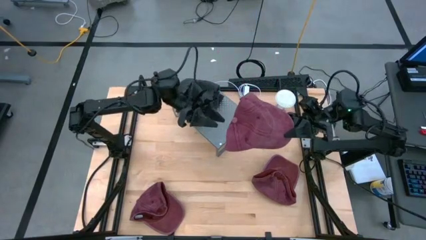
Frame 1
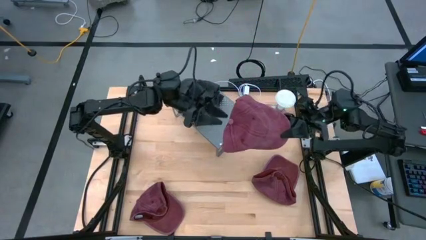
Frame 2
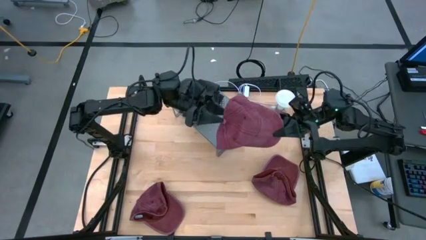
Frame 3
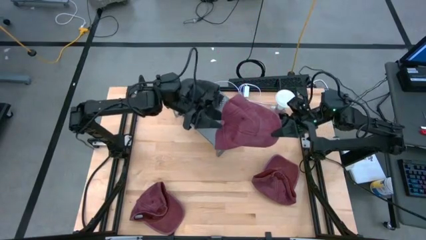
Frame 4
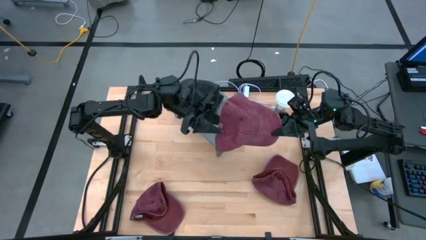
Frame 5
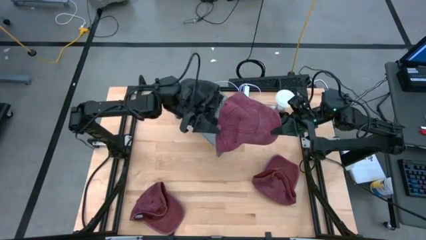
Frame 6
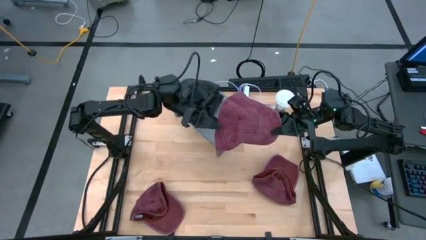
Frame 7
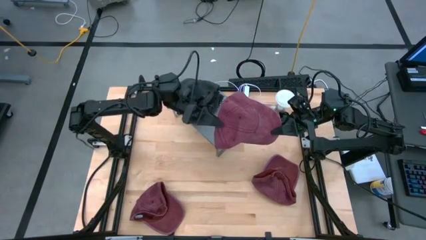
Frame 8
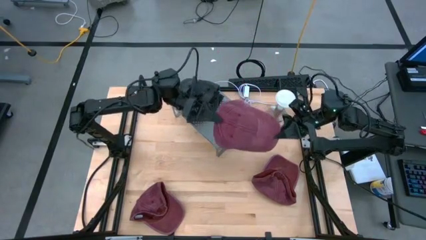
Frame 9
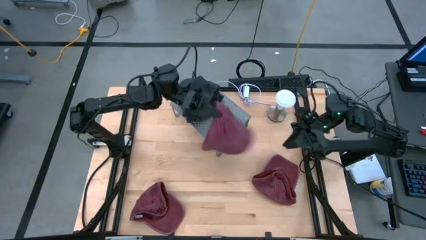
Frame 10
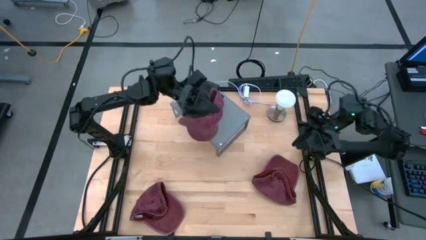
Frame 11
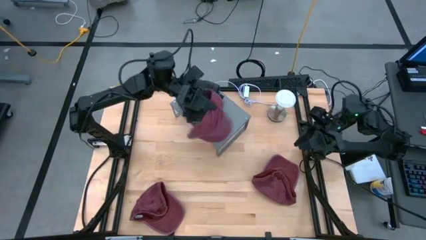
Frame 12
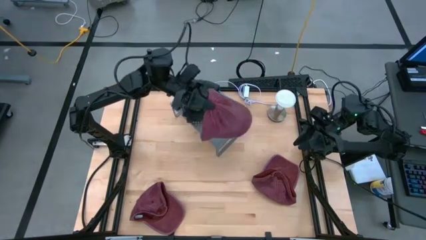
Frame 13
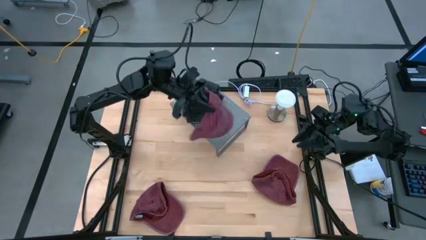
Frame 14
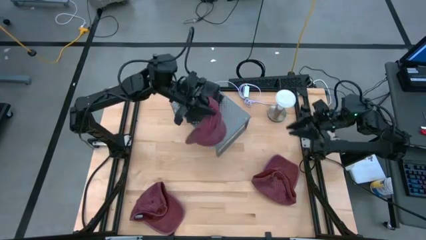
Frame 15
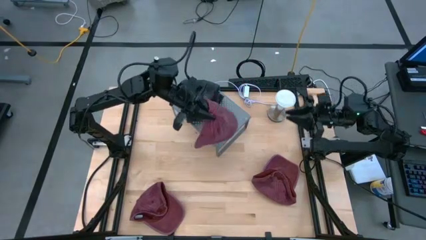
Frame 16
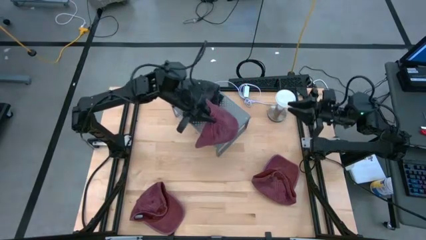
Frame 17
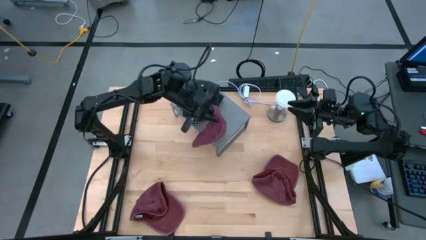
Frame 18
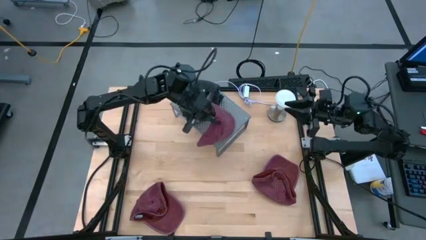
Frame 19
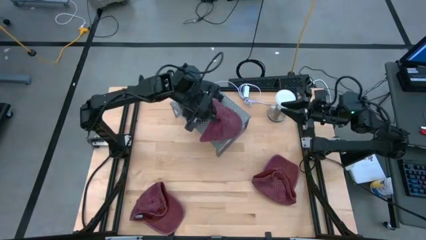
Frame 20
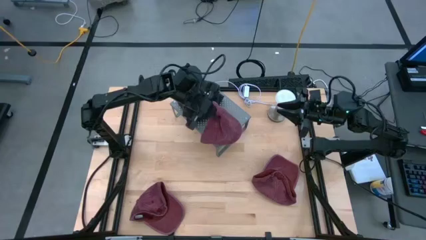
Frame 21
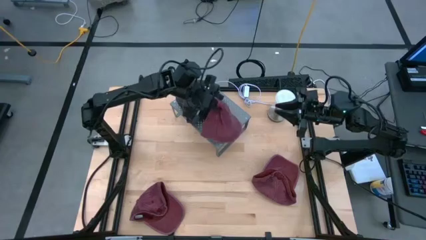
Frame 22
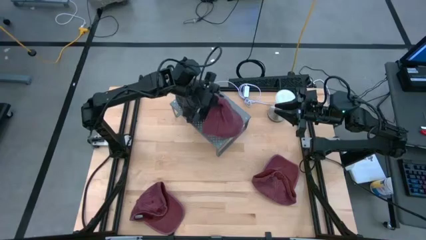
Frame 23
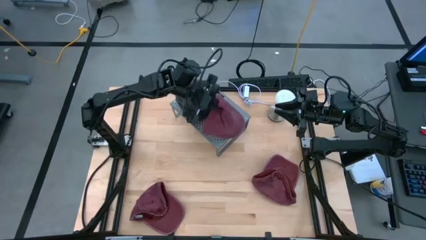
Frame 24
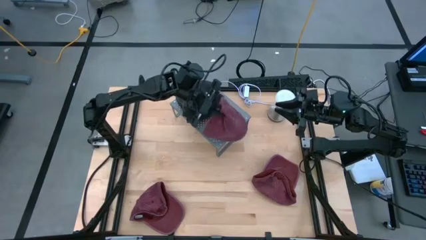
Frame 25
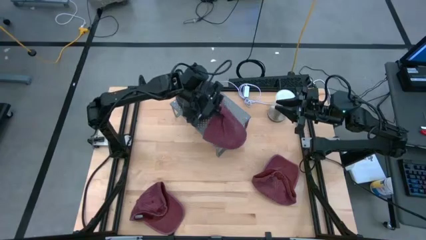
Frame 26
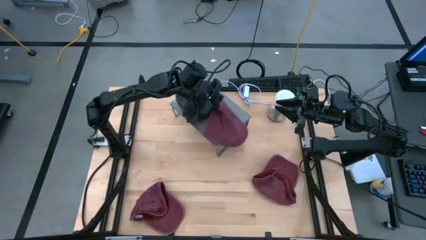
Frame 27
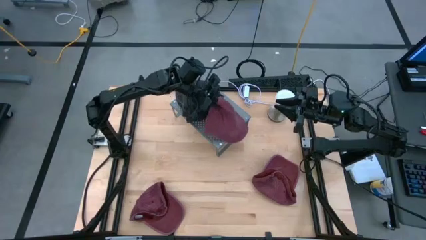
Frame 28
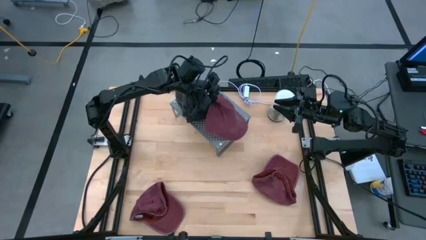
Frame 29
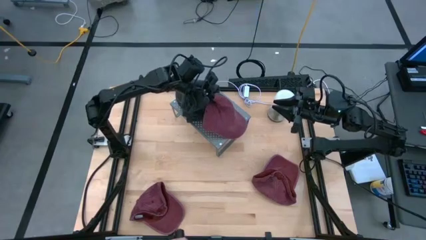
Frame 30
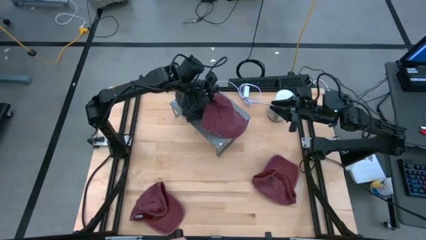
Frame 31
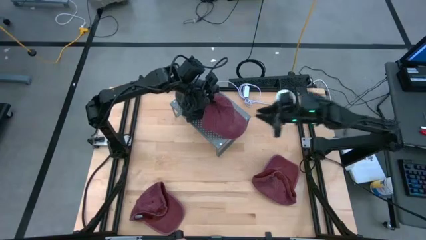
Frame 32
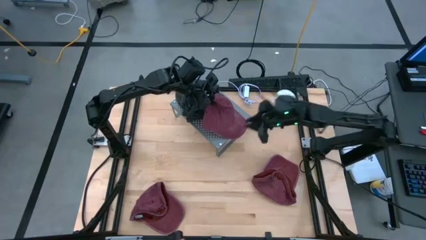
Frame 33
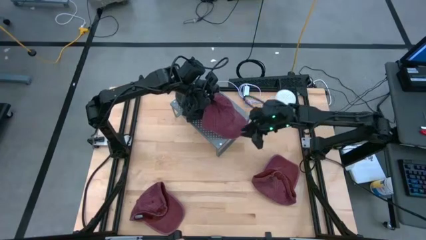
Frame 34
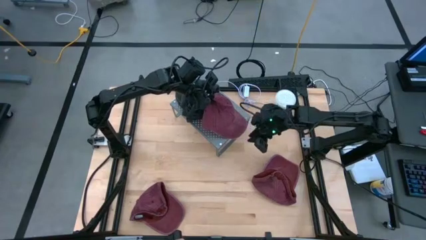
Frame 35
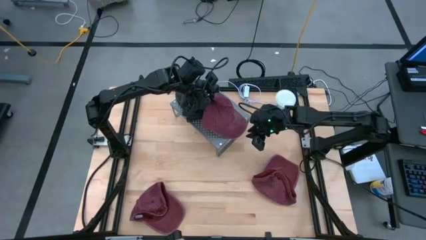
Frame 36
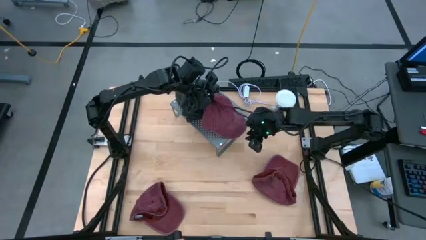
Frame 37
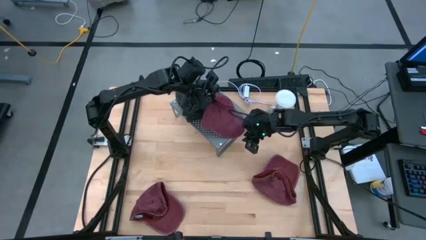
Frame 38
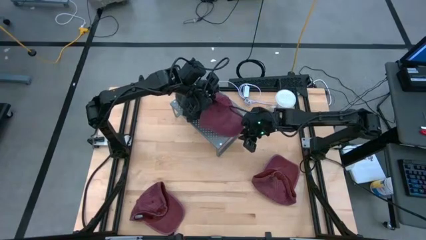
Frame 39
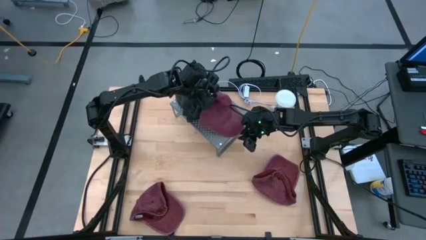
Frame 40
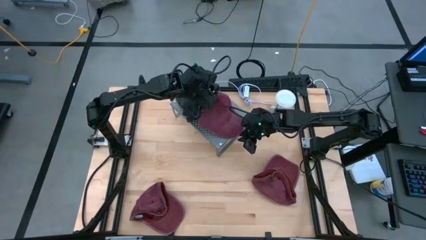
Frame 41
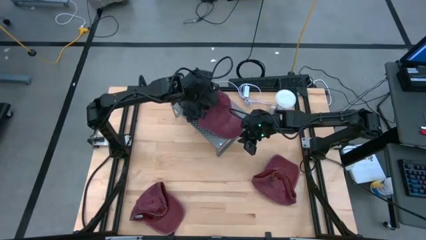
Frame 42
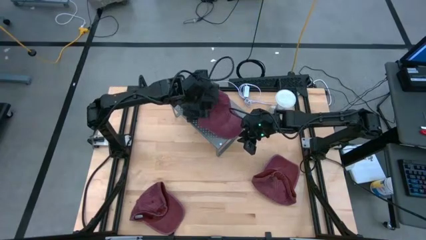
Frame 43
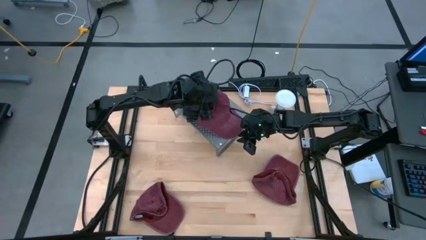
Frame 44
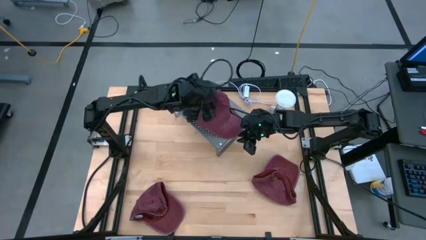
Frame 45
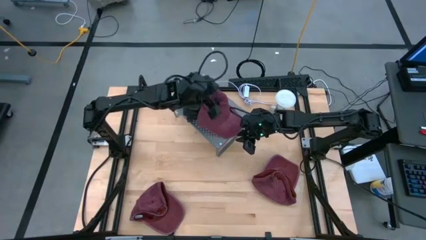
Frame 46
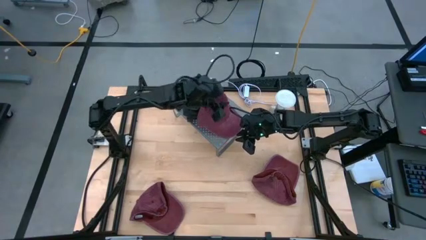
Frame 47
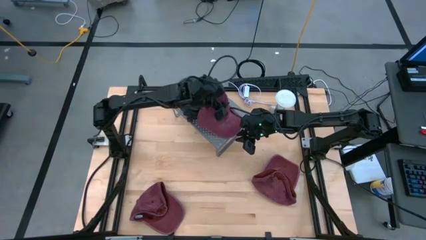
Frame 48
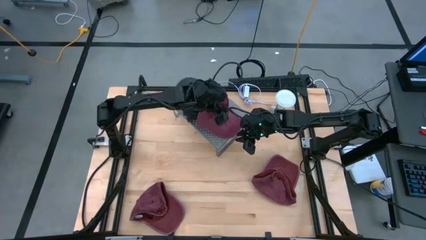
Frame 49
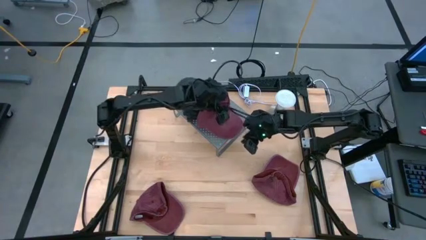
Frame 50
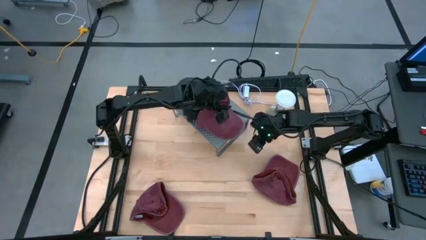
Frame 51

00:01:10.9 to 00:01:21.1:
Task: Pick & Place hat
Put the top red cap on the shelf

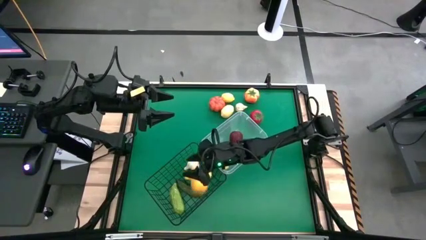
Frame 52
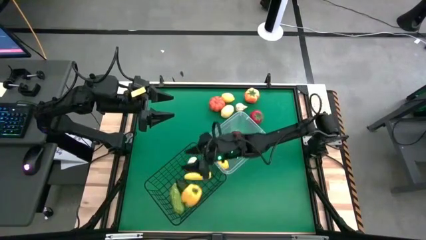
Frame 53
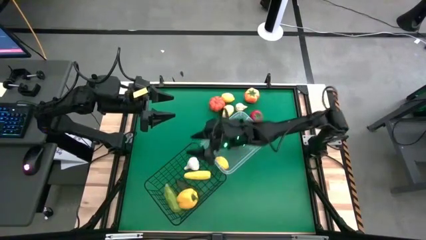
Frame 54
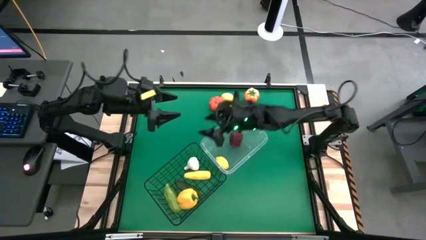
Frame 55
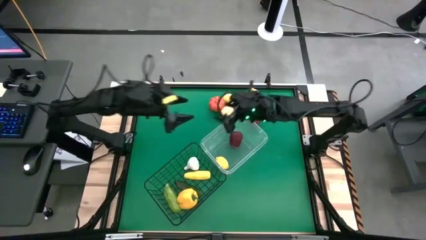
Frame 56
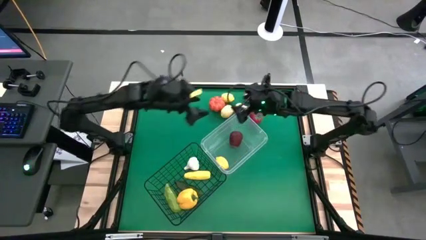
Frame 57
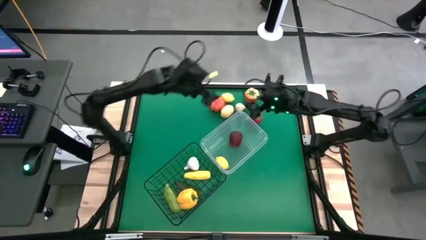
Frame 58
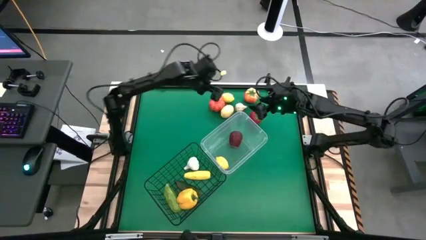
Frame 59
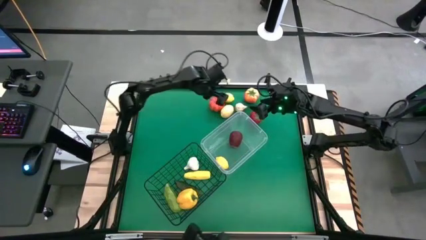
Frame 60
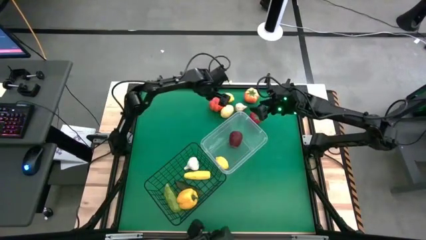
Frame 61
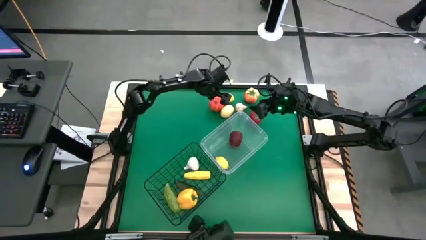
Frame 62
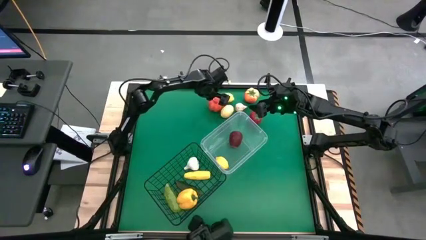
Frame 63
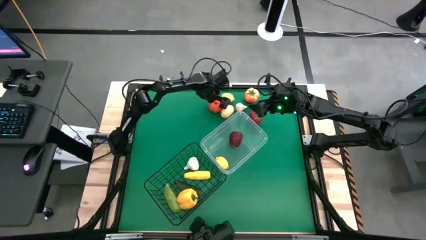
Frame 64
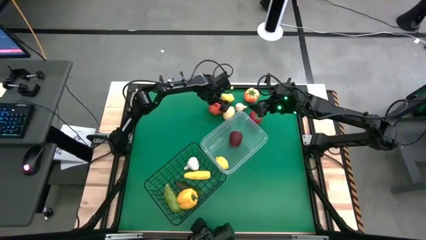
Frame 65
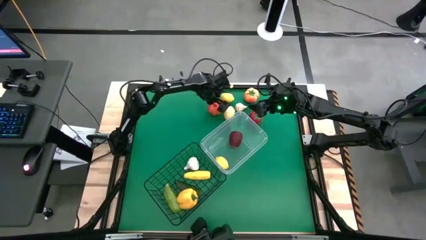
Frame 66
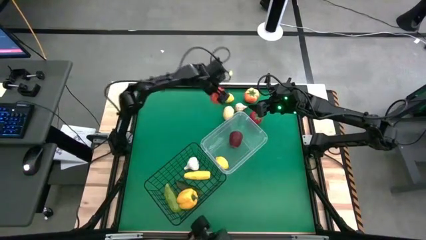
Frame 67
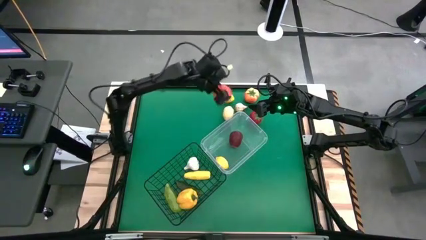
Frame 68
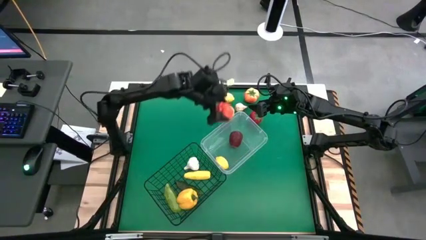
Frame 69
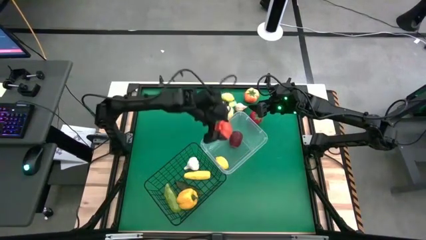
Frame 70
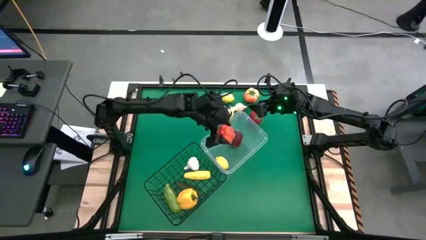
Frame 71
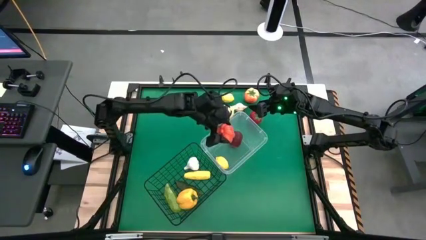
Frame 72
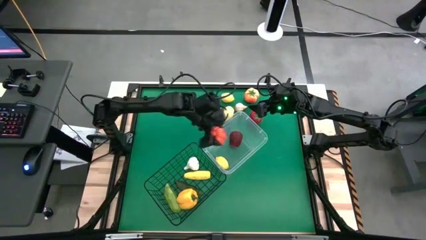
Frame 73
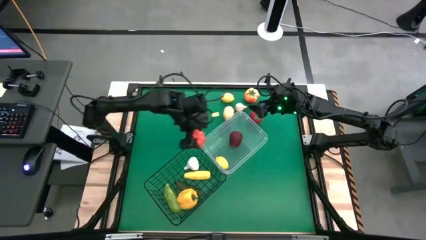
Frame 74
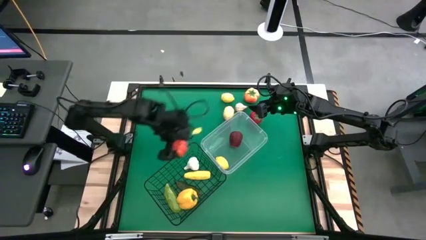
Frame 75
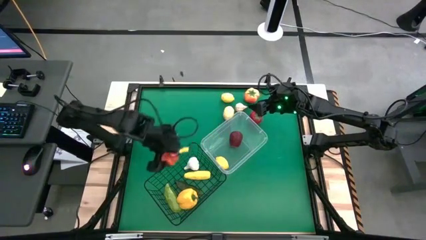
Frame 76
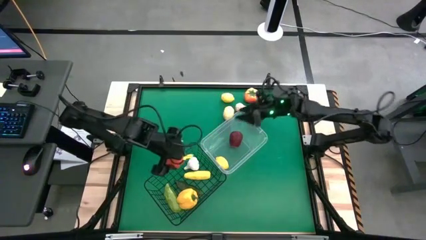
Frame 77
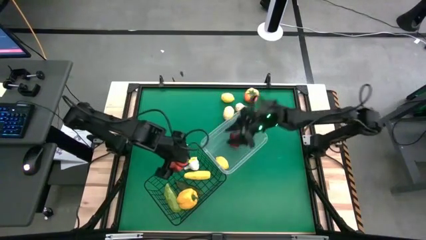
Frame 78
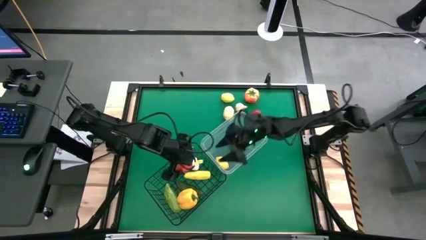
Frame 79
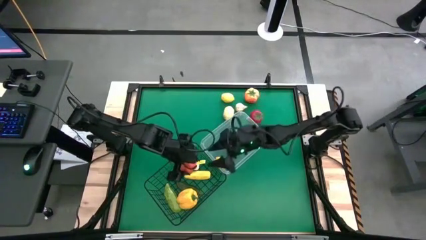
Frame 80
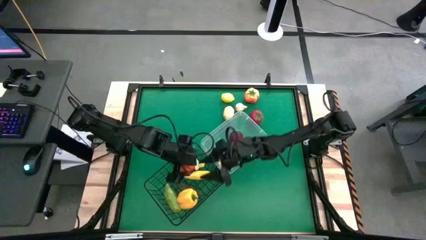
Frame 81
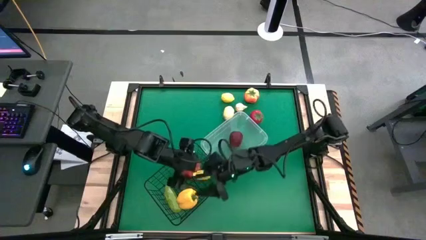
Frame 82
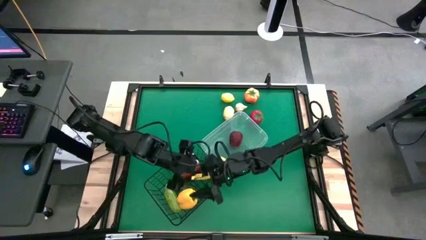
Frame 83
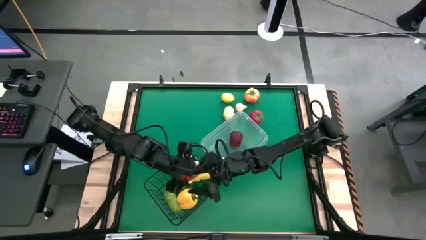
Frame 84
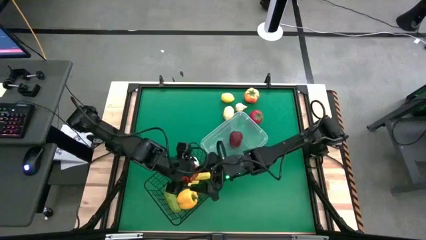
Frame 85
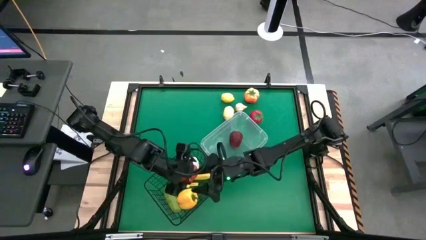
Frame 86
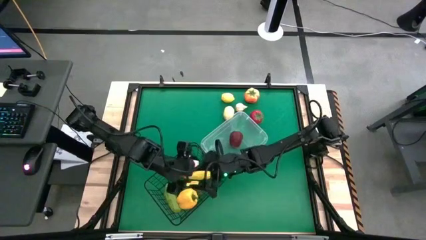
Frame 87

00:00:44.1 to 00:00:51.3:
Task: Sort produce into baskets
Put the pumpkin into the wire basket
